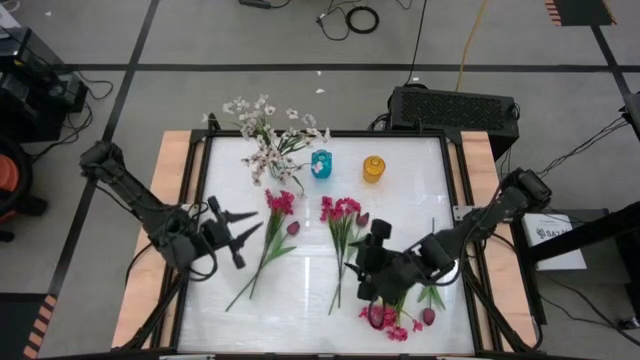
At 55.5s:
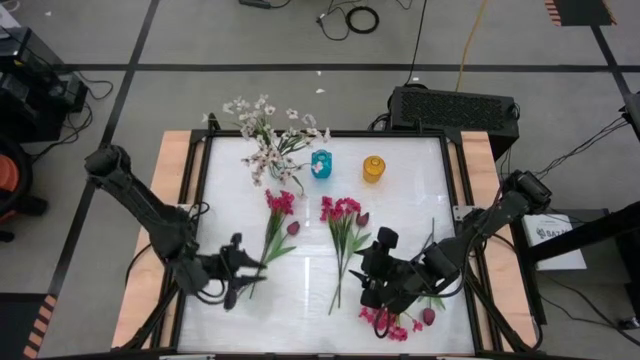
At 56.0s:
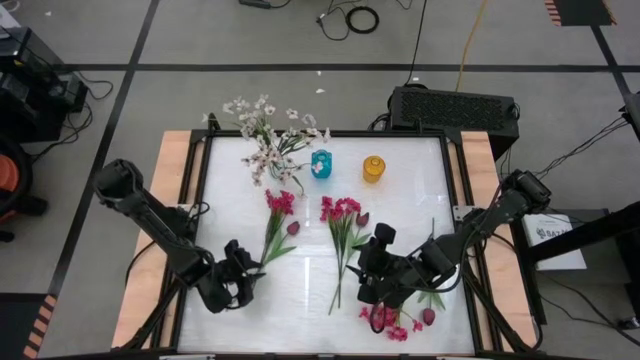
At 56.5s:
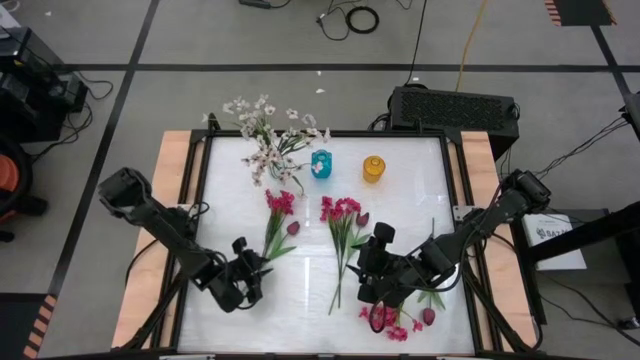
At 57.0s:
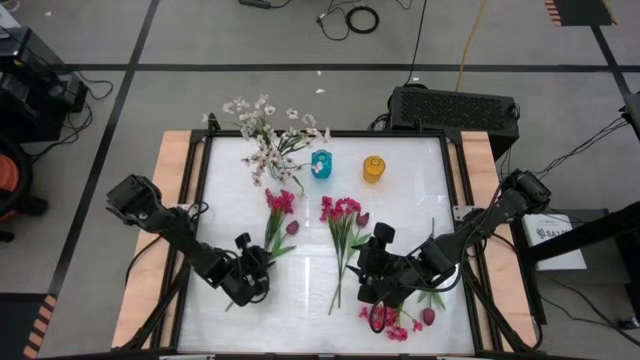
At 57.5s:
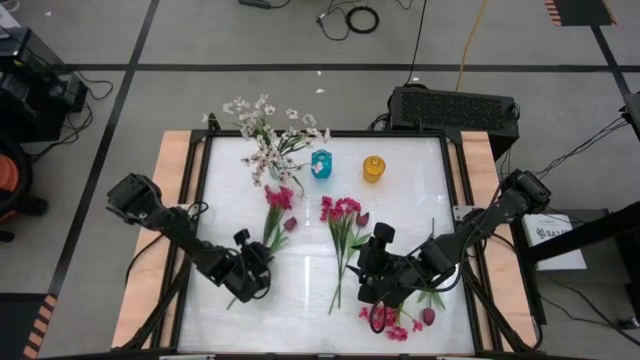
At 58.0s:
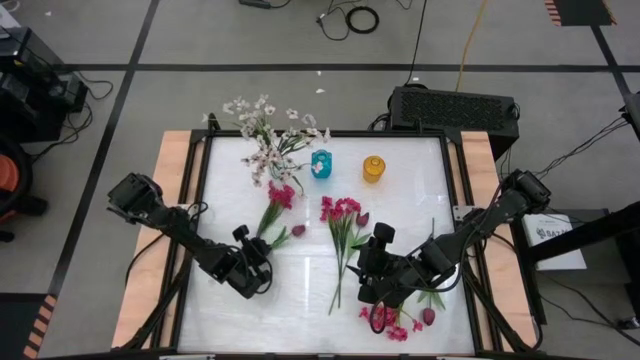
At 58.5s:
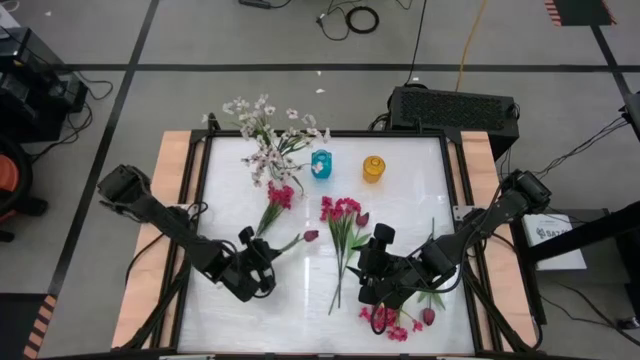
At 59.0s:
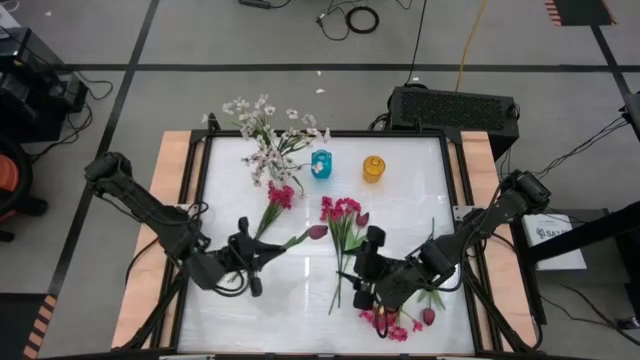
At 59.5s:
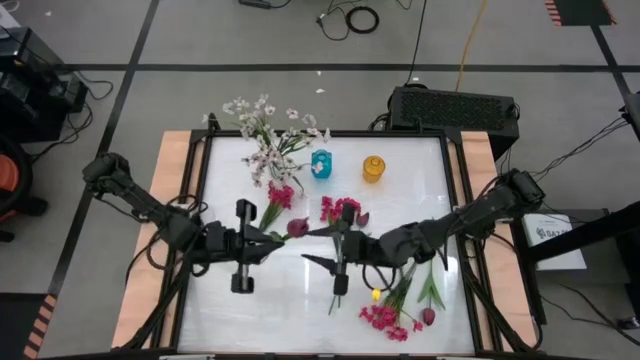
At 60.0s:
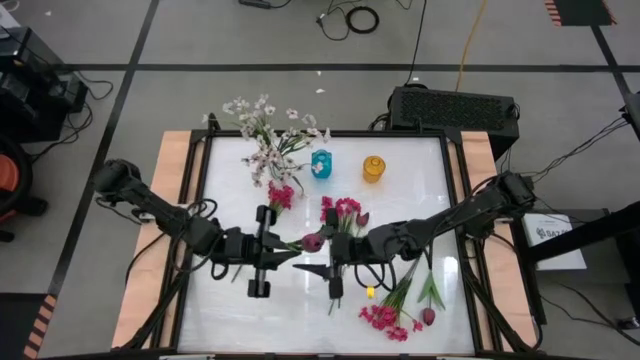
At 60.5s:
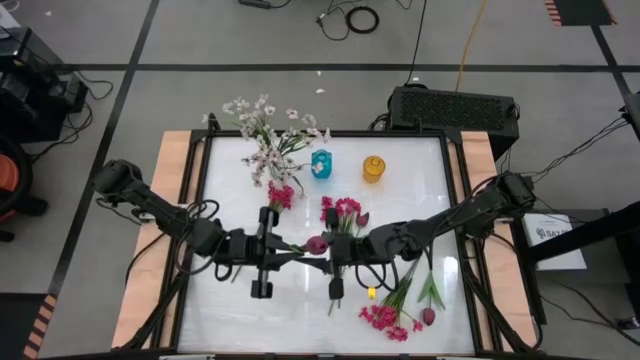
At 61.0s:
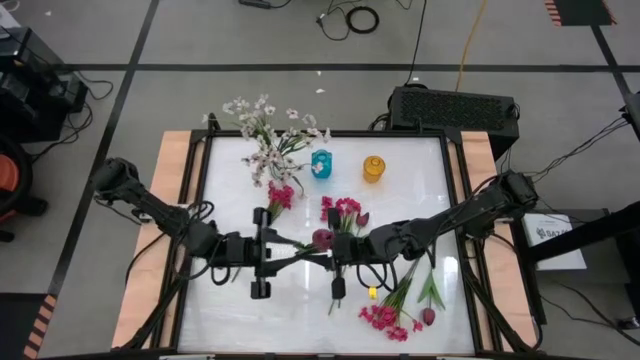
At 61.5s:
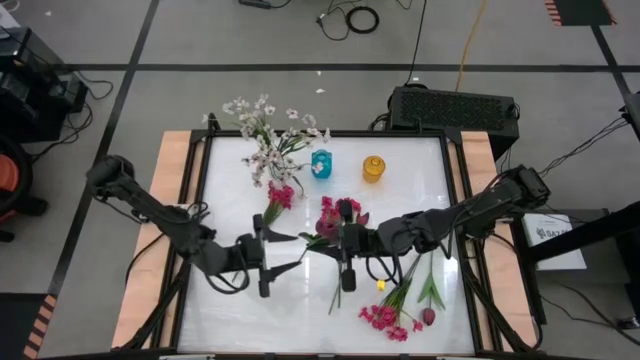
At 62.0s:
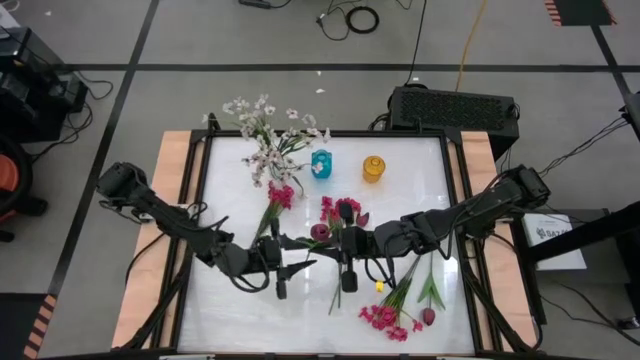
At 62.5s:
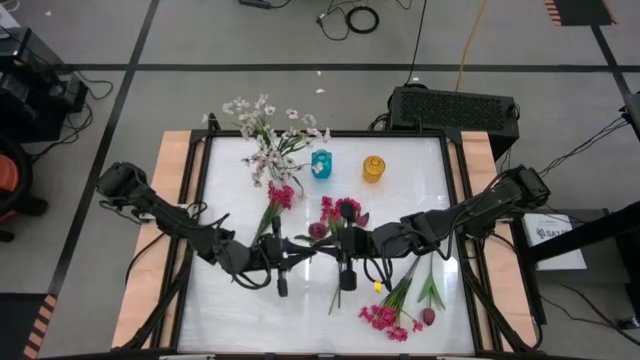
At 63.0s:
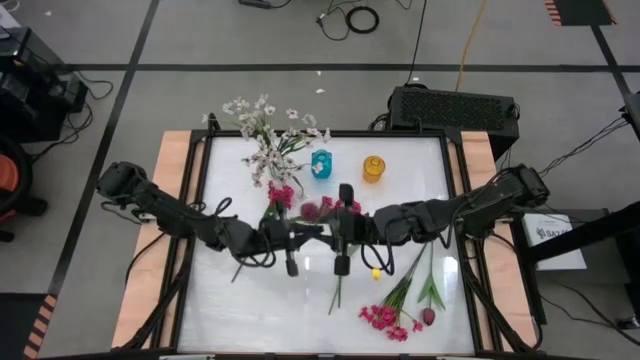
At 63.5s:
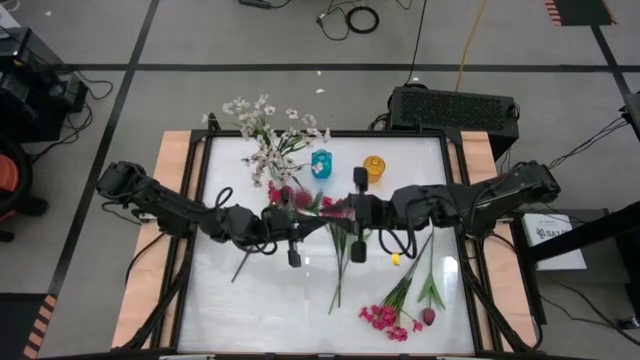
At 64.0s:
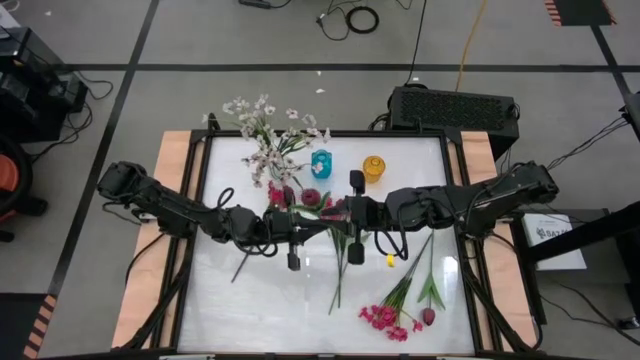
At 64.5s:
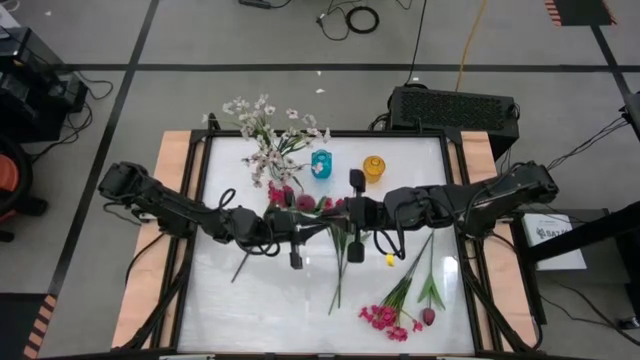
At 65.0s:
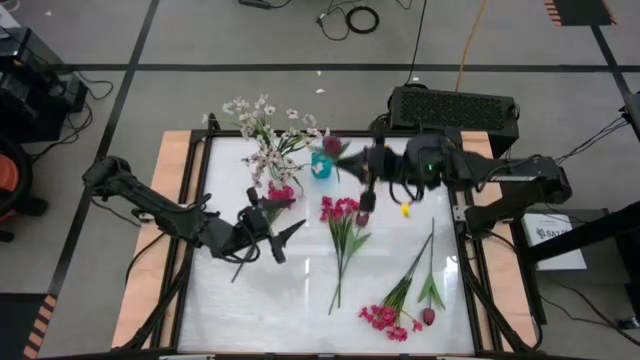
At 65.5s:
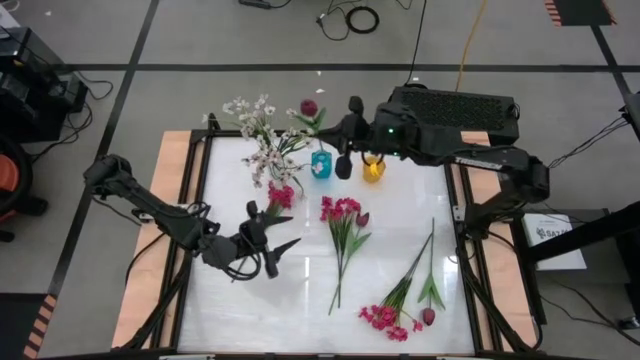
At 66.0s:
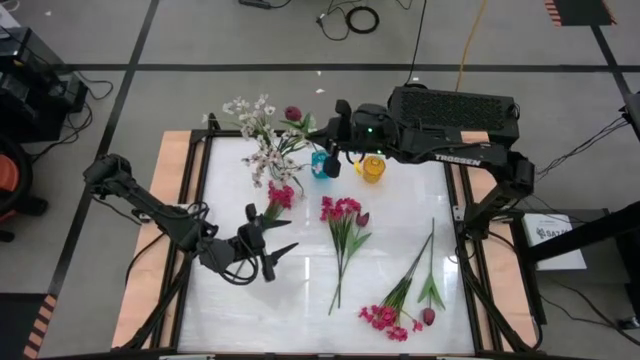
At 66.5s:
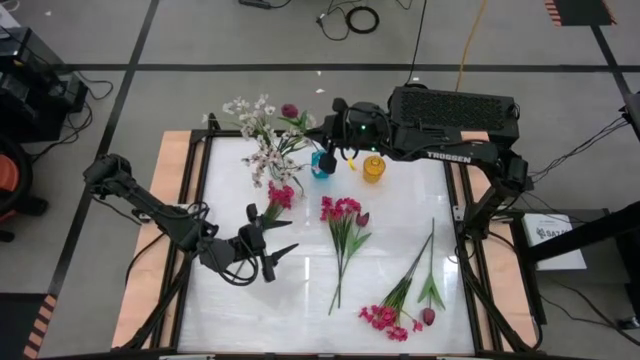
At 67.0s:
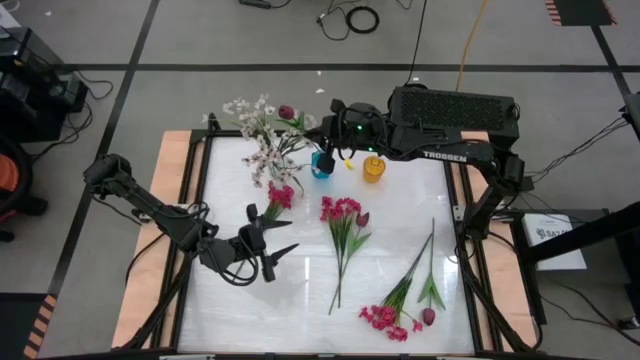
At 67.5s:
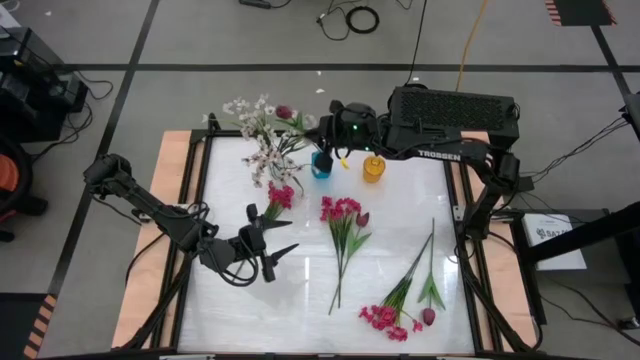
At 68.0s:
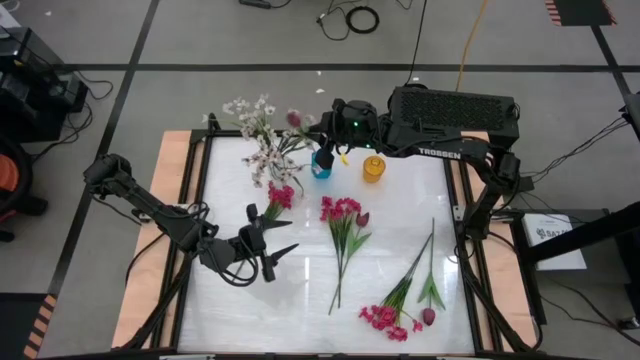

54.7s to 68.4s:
Task: Sort flowers into vase by color
Put the left red tulip into the blue vase

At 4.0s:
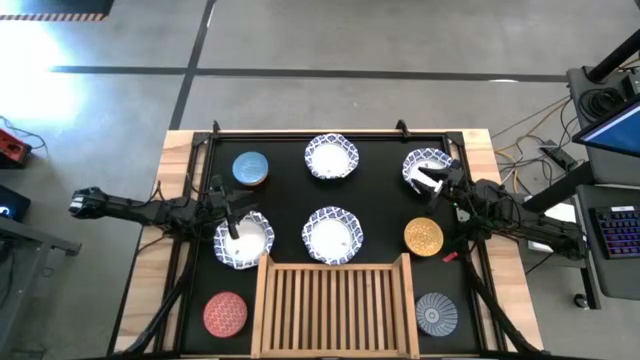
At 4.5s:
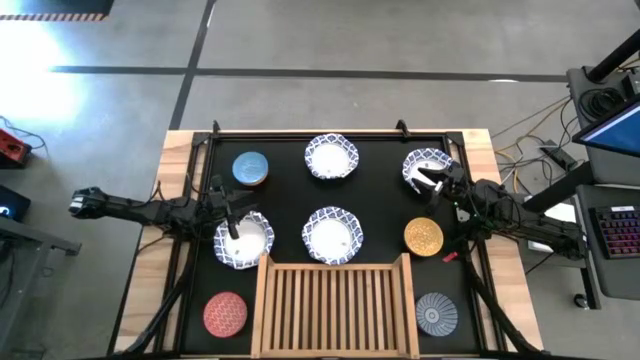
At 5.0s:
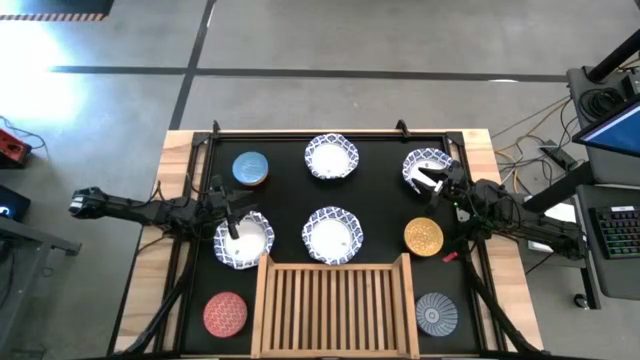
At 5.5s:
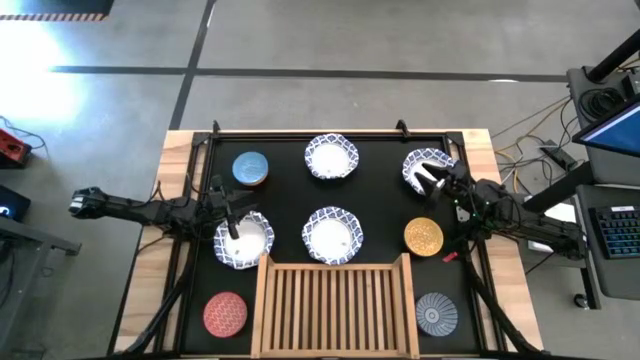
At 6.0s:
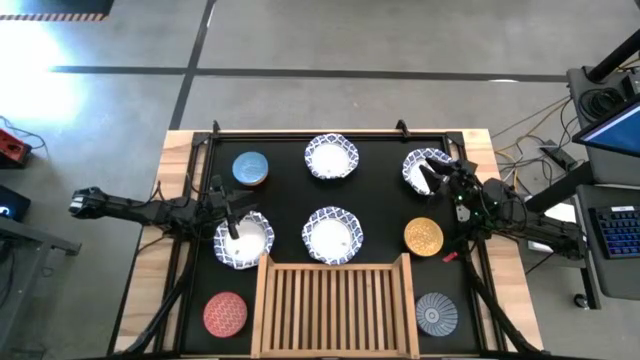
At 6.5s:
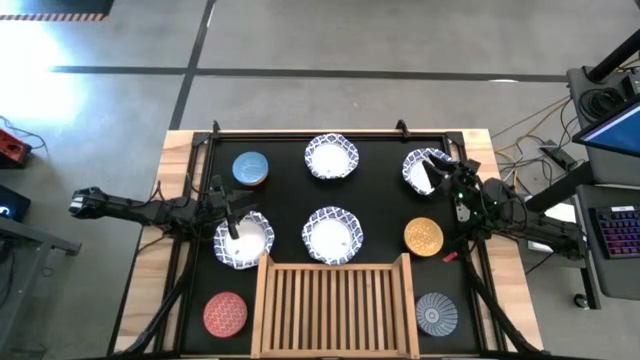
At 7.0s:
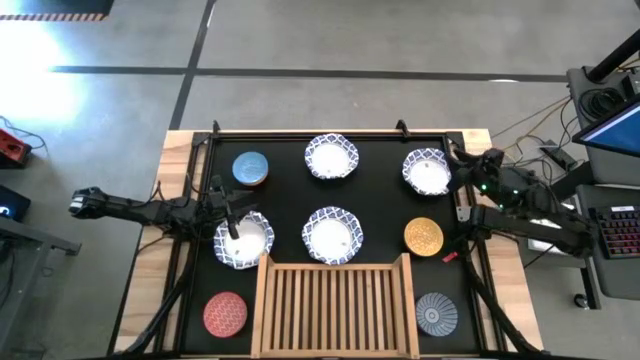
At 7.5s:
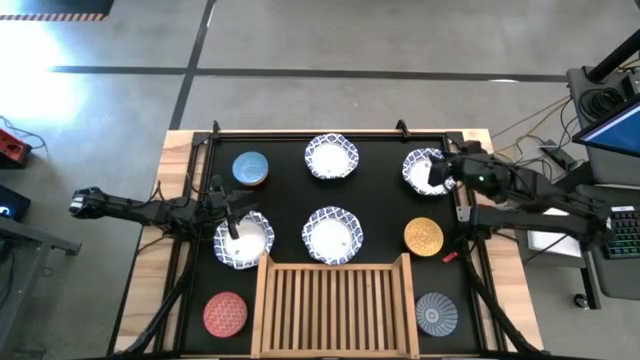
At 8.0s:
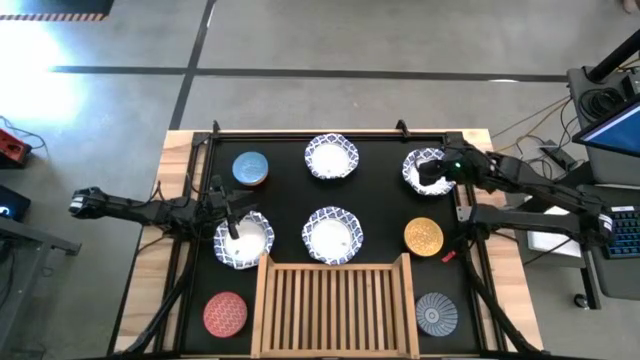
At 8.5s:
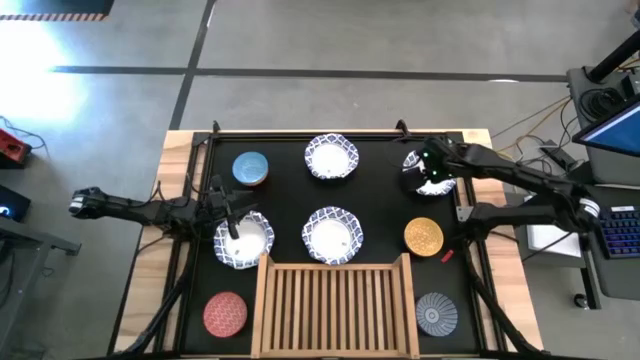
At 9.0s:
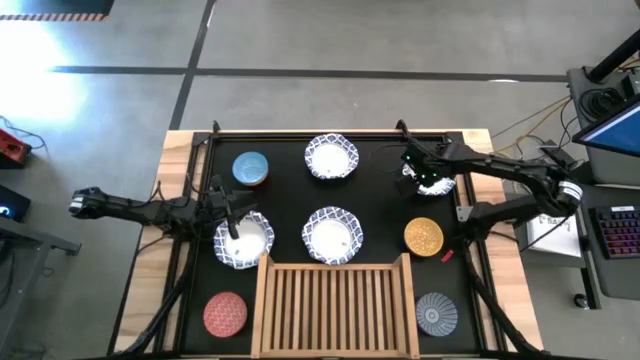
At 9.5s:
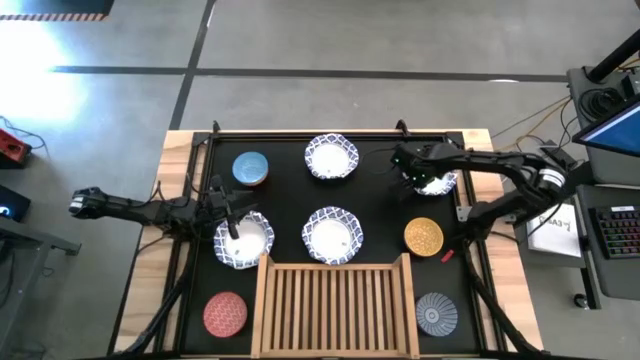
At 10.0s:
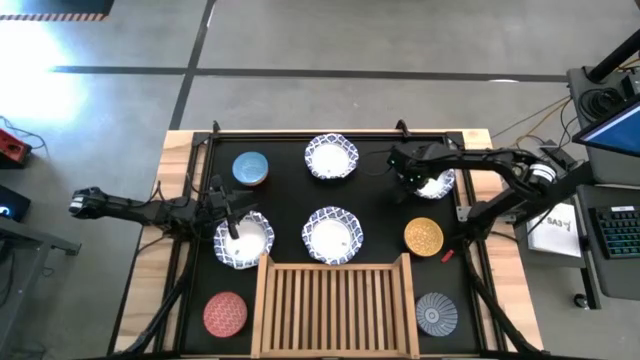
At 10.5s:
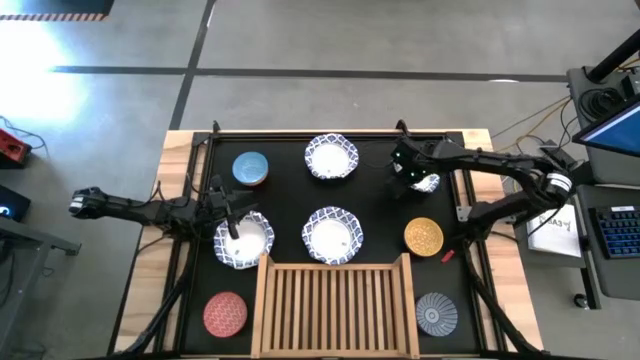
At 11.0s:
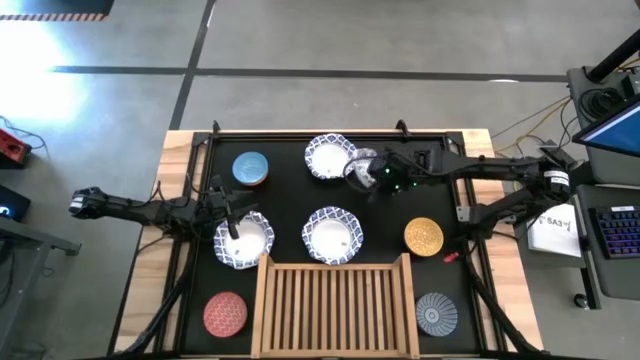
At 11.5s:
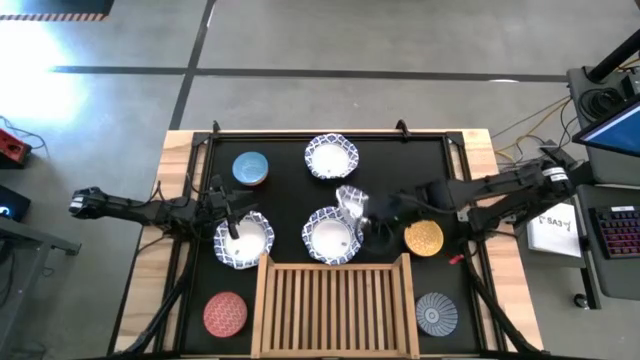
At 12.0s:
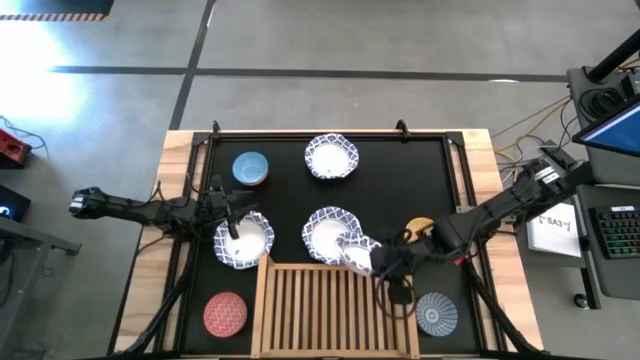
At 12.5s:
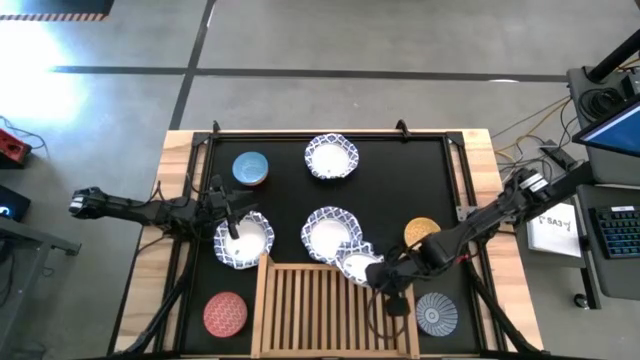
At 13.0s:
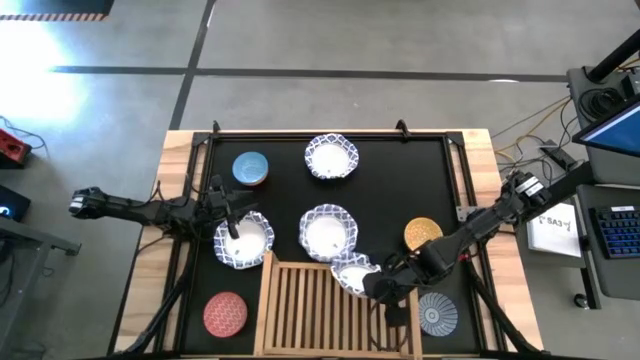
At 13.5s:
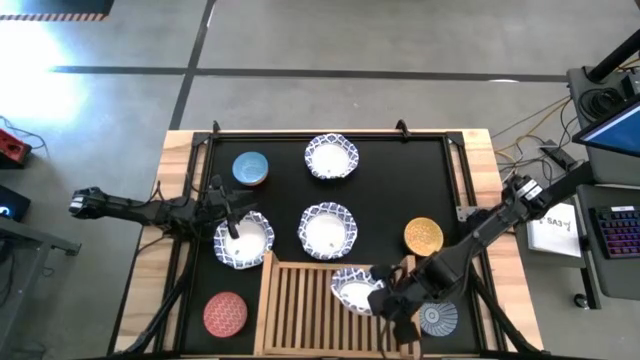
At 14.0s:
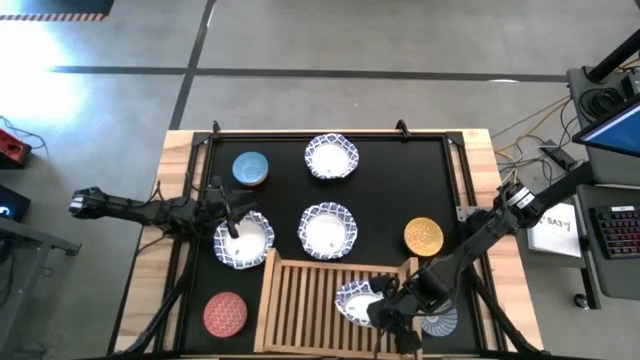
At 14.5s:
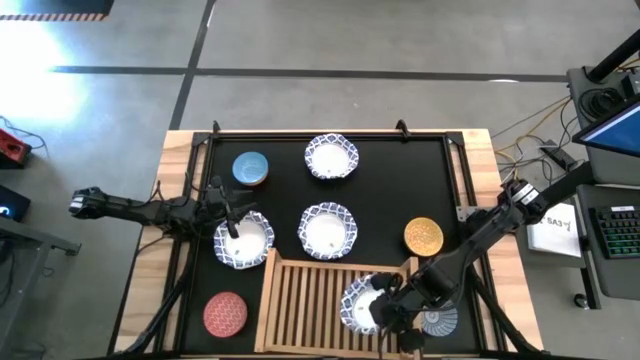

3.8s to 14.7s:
Task: Place and stack bowls onto a shelf
Put the white patterned bowl on the shelf
